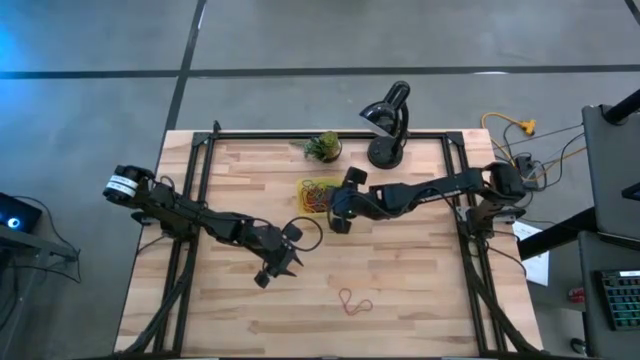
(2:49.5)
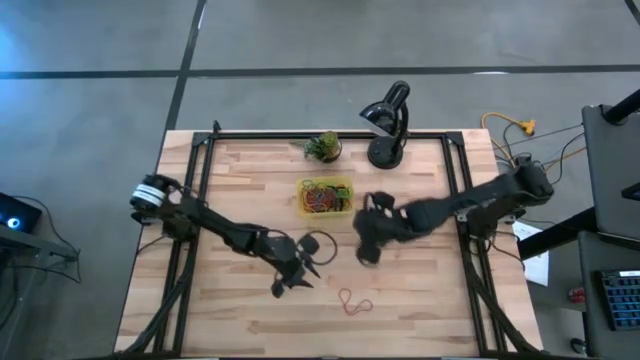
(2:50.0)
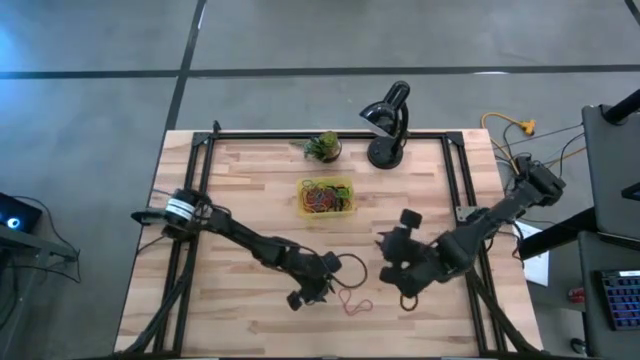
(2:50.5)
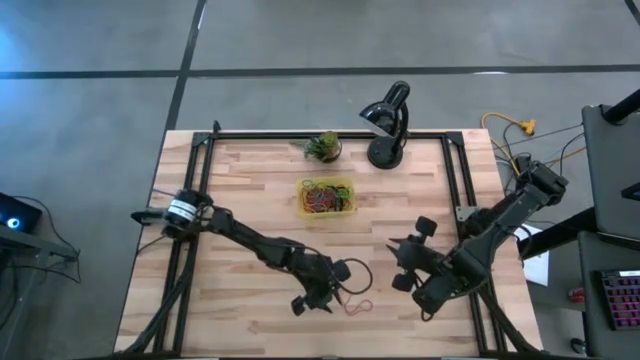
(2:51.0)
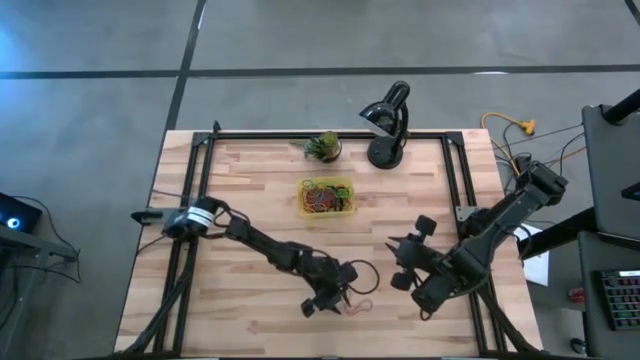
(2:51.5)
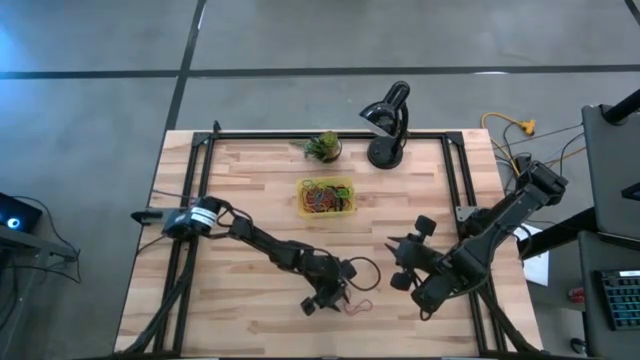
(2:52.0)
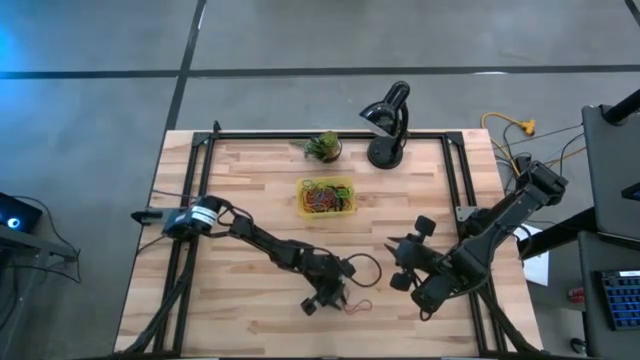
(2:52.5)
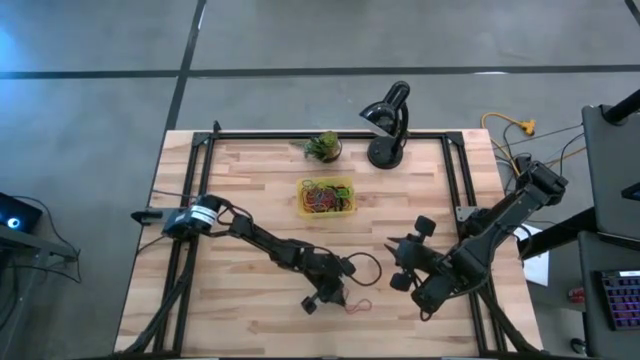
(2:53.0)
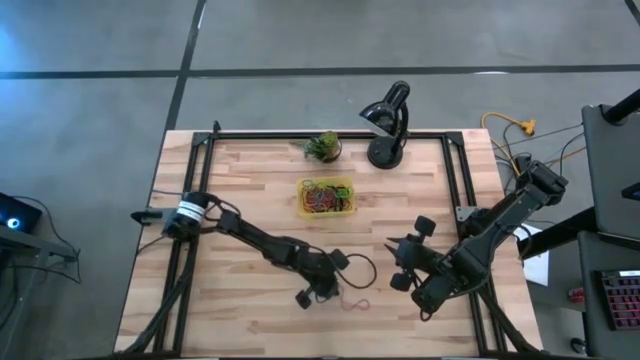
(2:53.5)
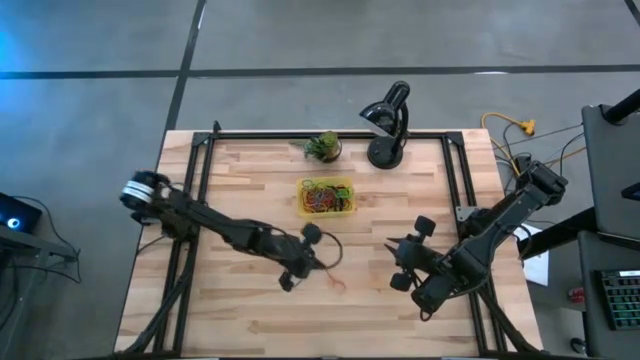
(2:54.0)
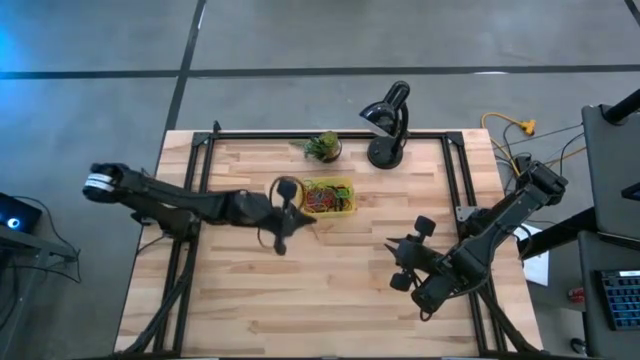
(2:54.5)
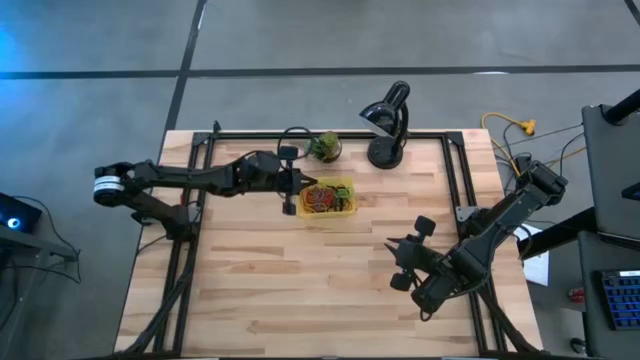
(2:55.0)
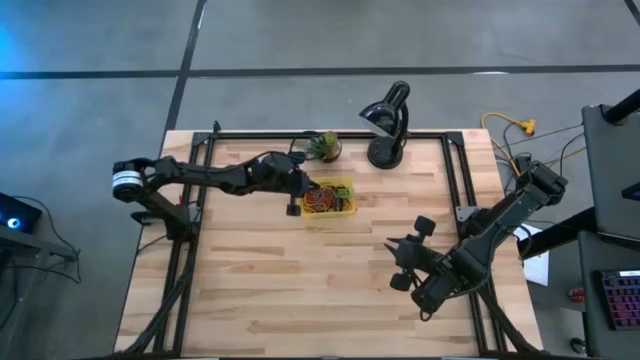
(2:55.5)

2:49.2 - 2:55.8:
Task: Pick and place rubber bands into bin
Put the red rubber band in the yellow bin

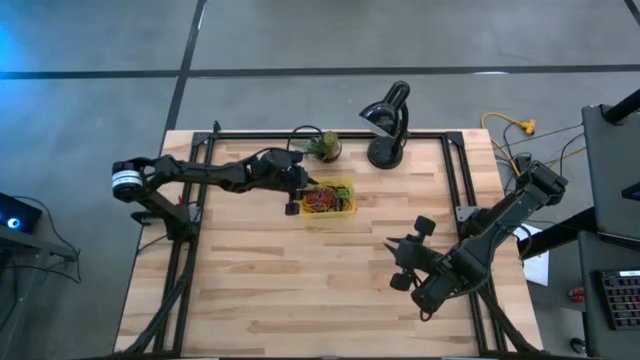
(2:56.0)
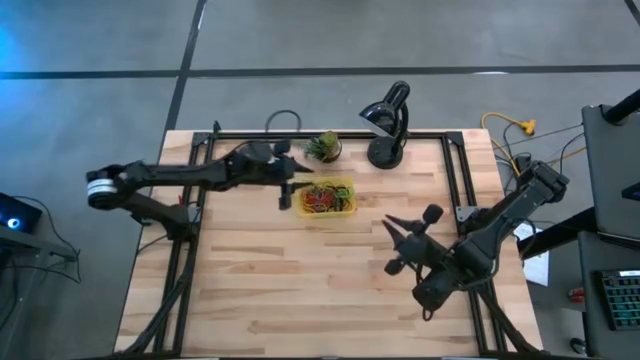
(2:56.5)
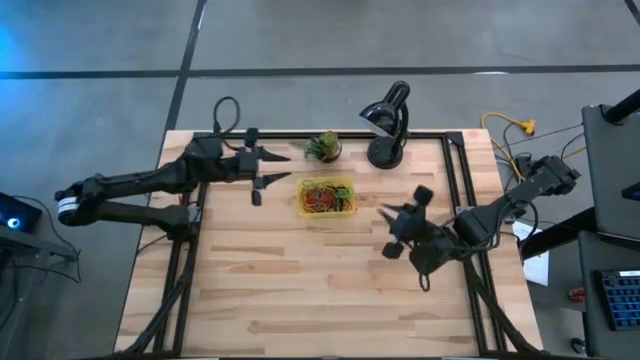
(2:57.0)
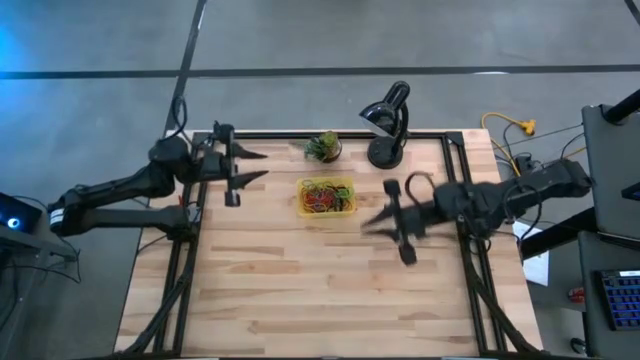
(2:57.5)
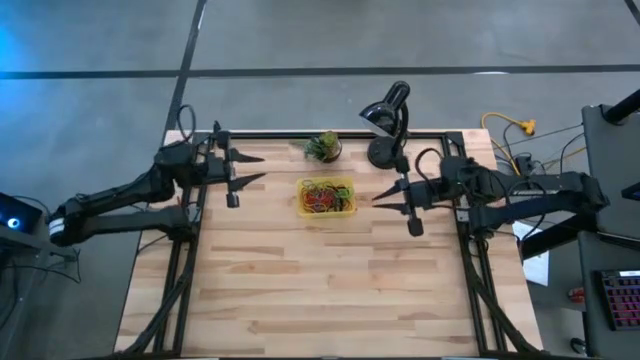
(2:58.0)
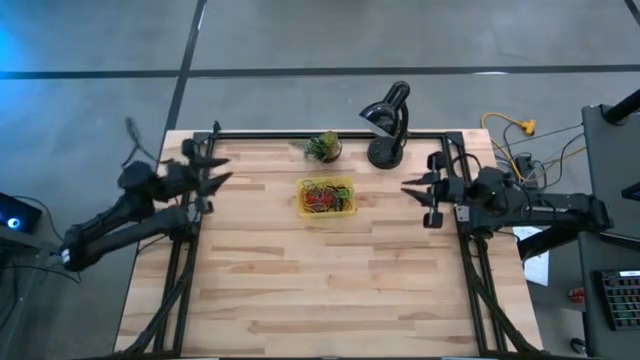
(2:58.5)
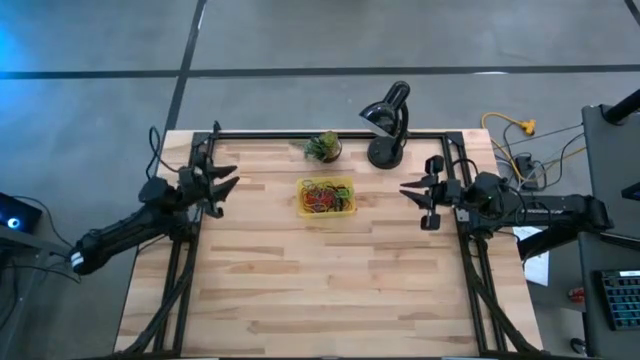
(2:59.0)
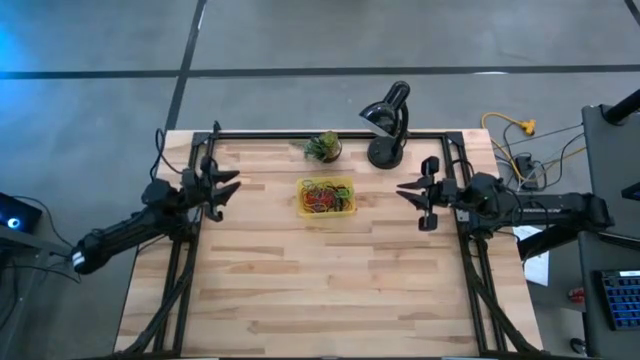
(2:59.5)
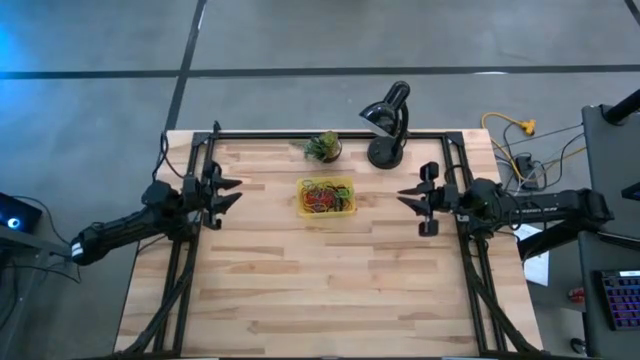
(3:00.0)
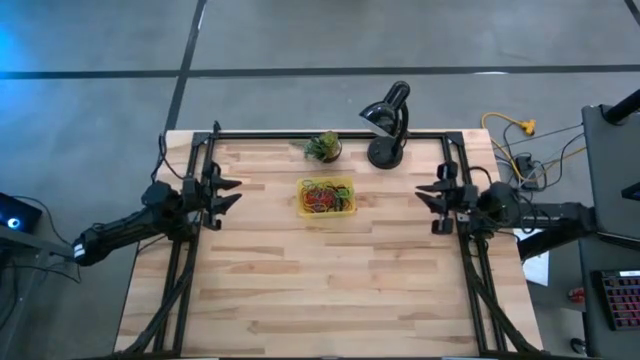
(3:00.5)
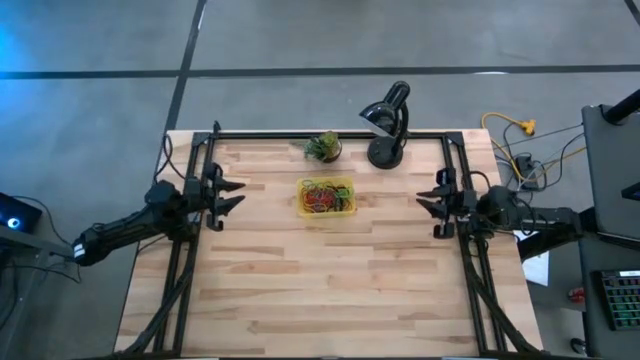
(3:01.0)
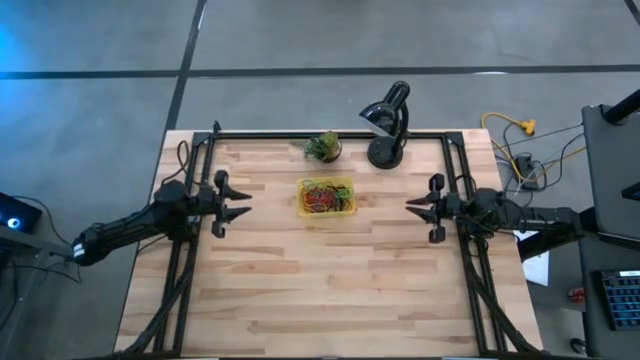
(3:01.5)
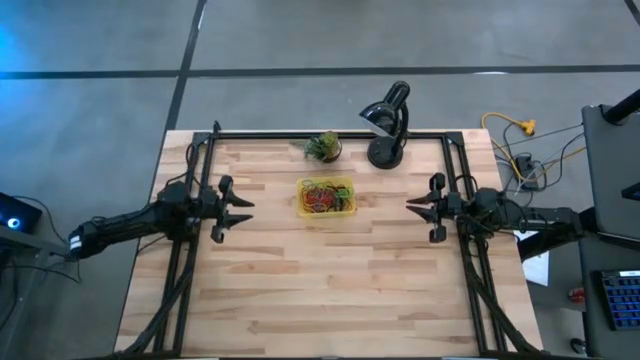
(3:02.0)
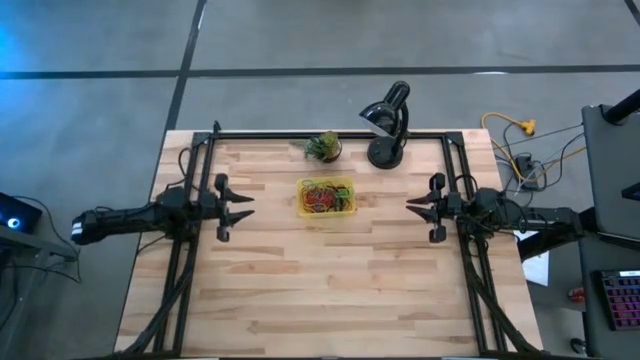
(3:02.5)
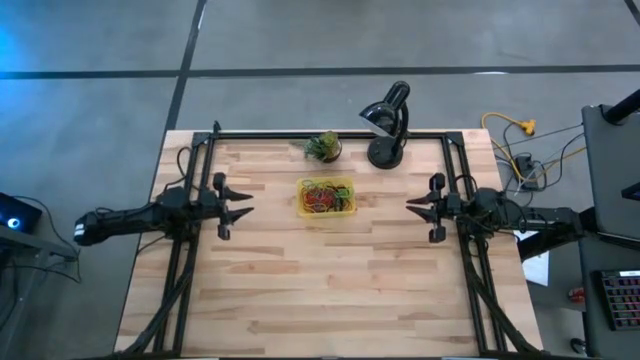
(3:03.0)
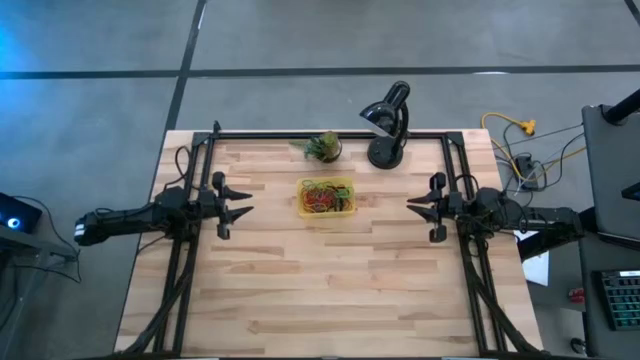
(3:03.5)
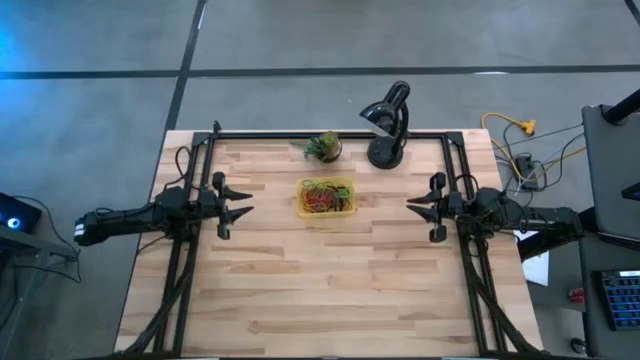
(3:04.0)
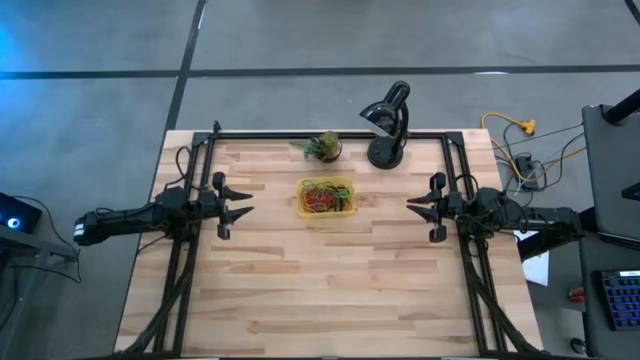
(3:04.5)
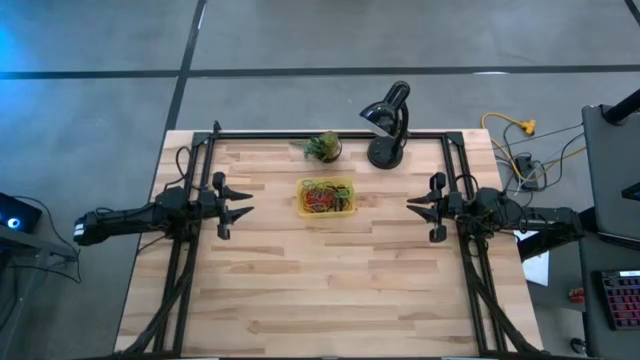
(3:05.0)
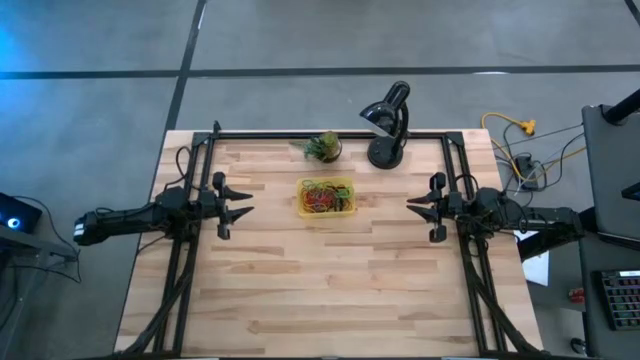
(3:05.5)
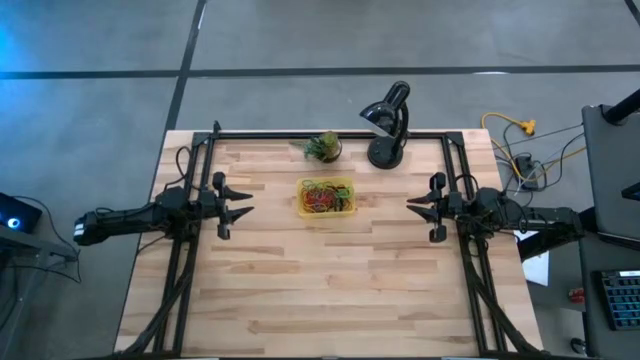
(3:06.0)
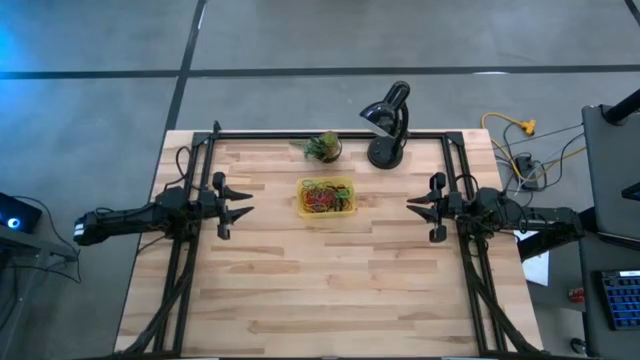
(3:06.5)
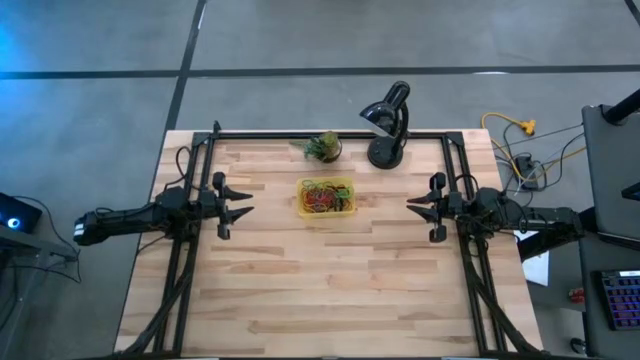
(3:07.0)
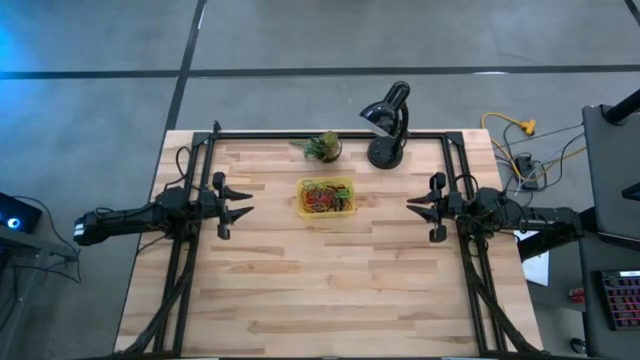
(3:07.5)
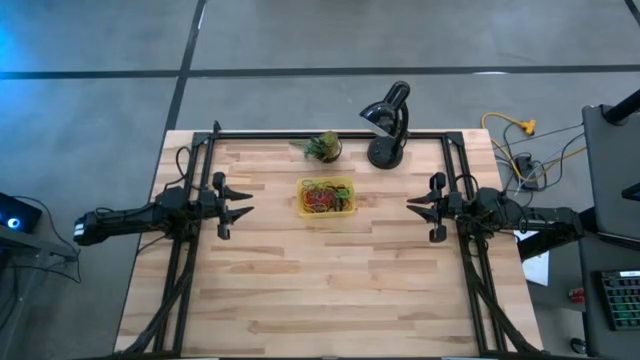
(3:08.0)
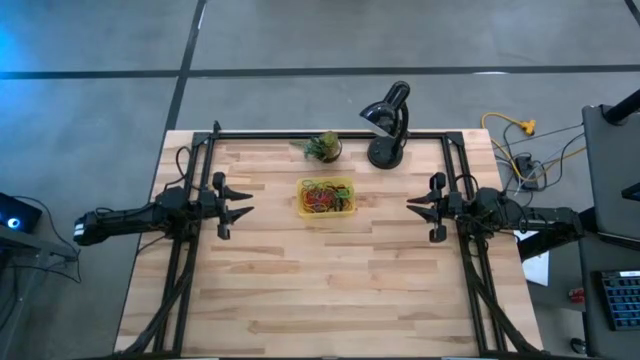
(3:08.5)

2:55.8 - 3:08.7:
Return to Home Position

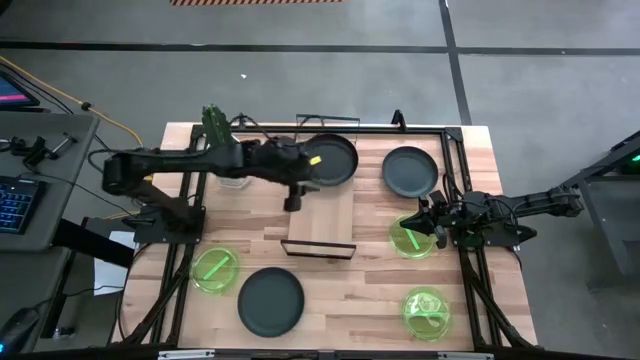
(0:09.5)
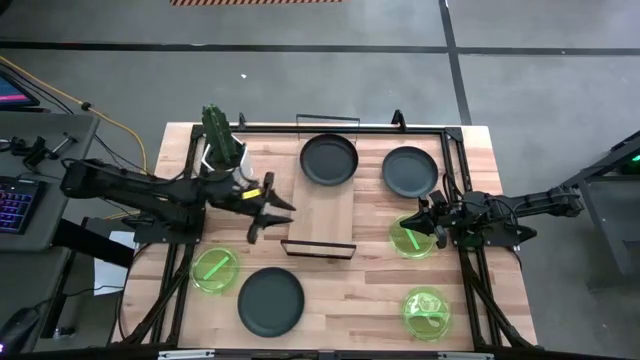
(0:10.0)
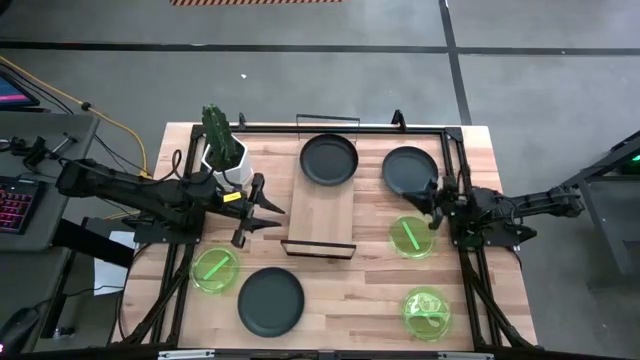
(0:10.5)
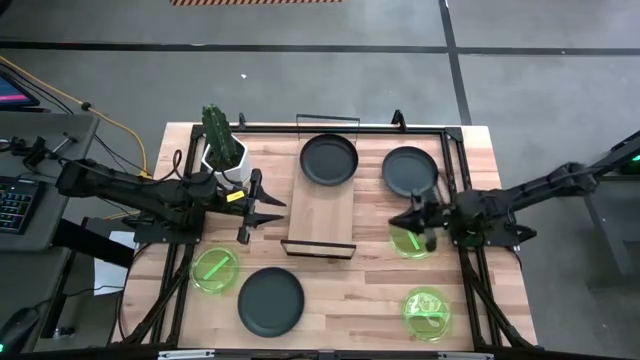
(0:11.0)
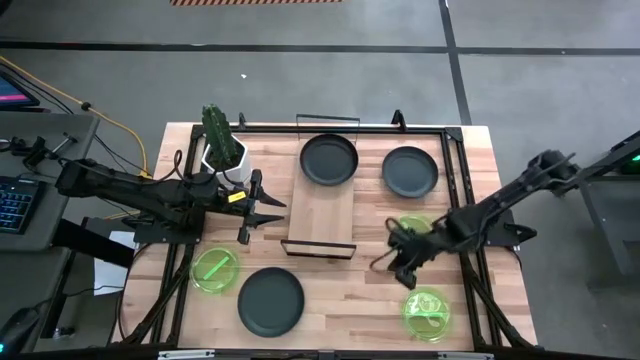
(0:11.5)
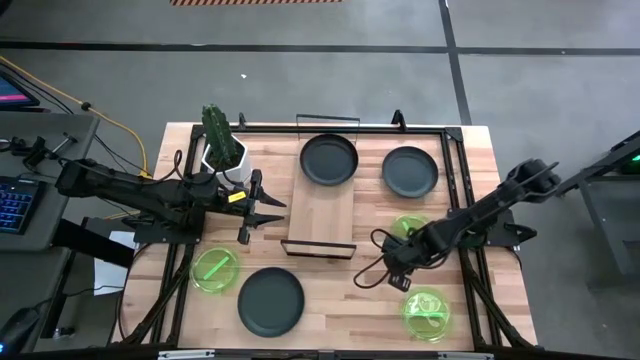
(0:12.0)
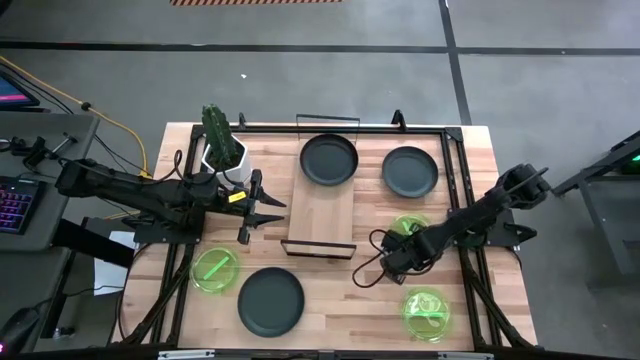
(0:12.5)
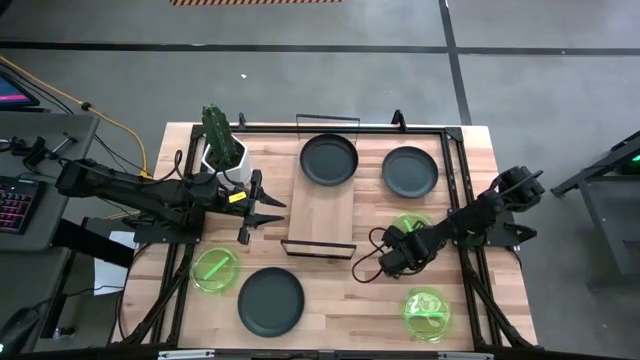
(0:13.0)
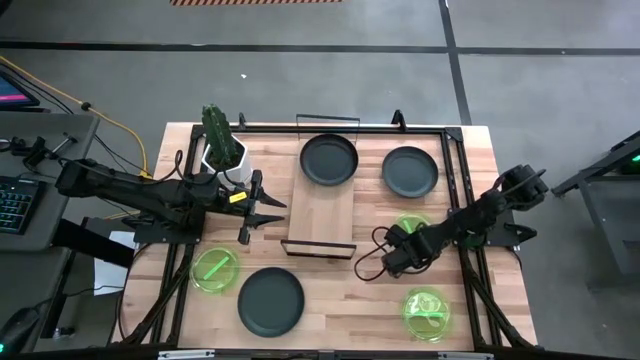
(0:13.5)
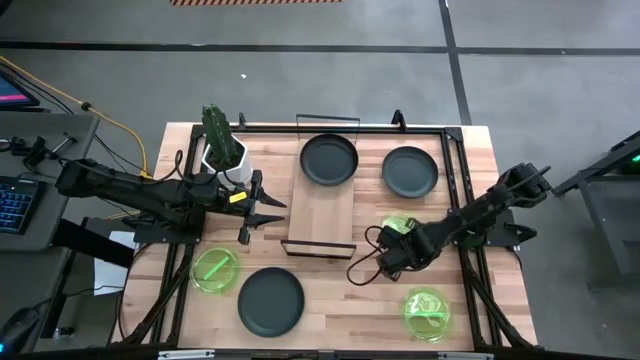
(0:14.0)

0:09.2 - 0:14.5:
Task: Place and stack plates onto a shelf
Put the top right transparent green plate on the shelf
